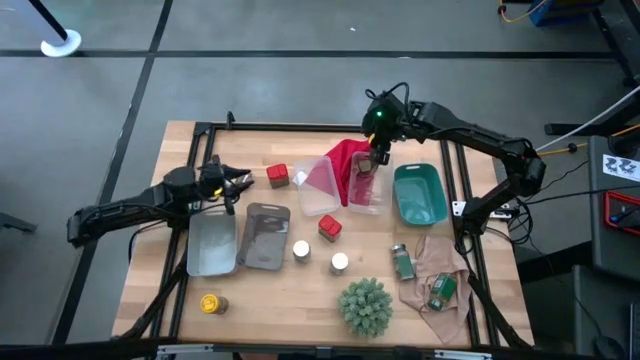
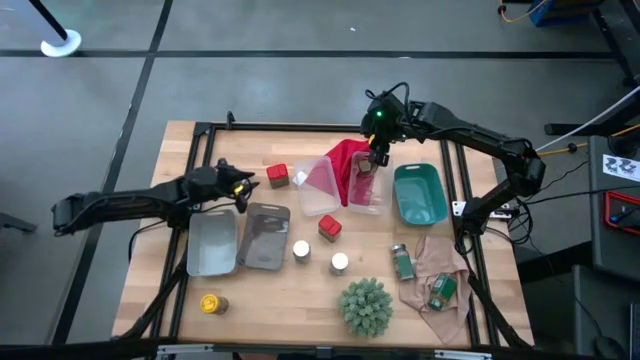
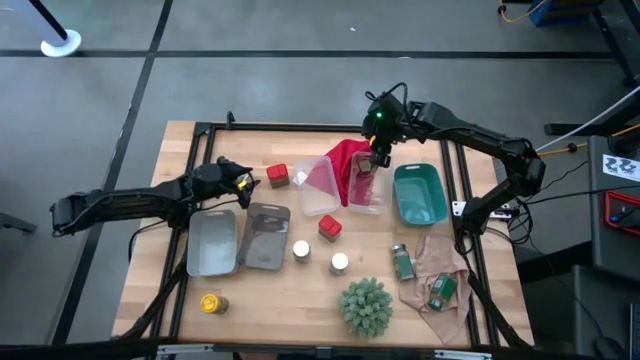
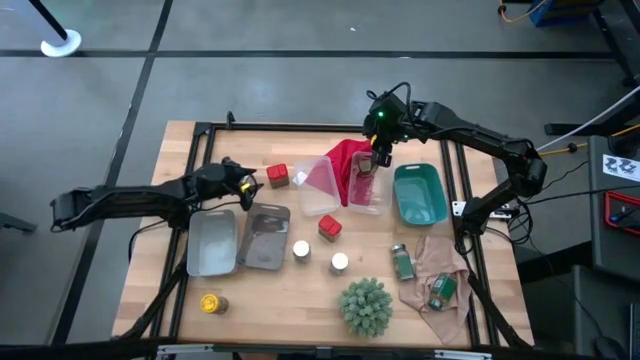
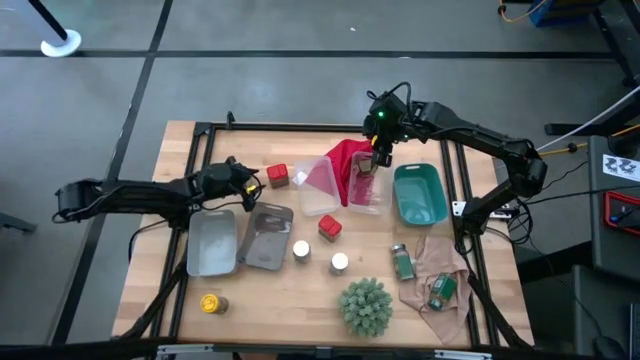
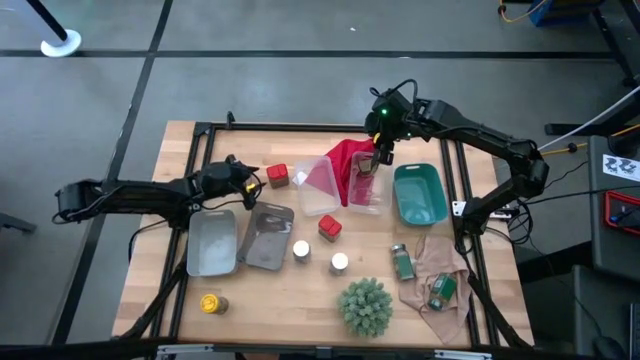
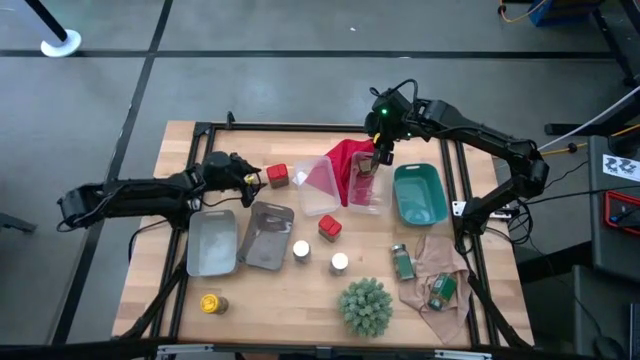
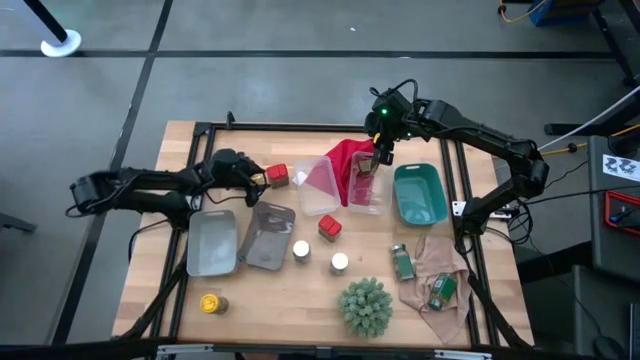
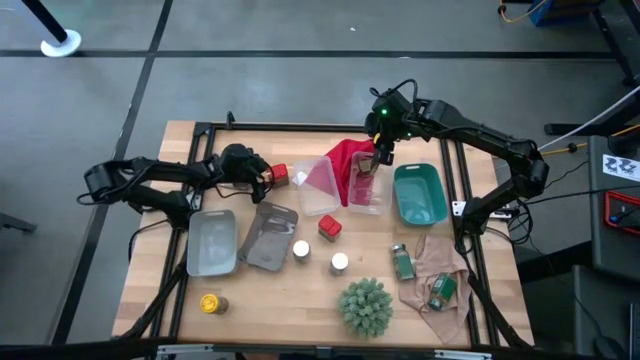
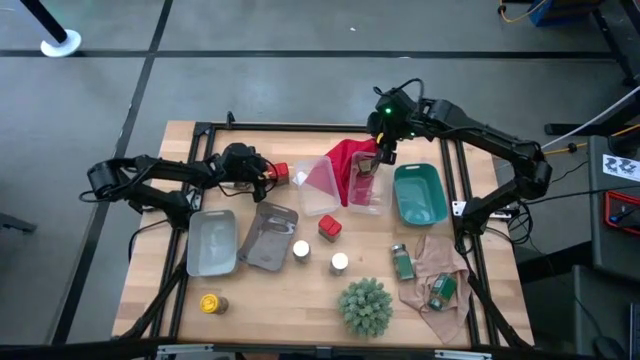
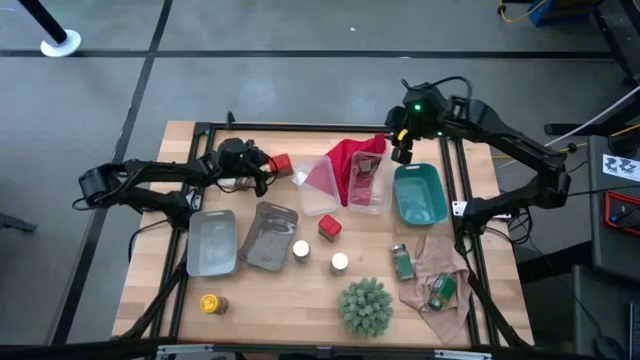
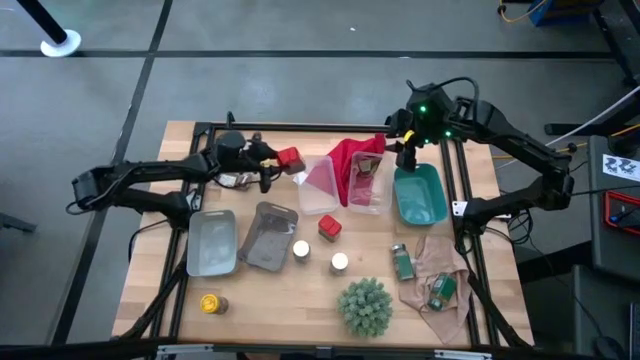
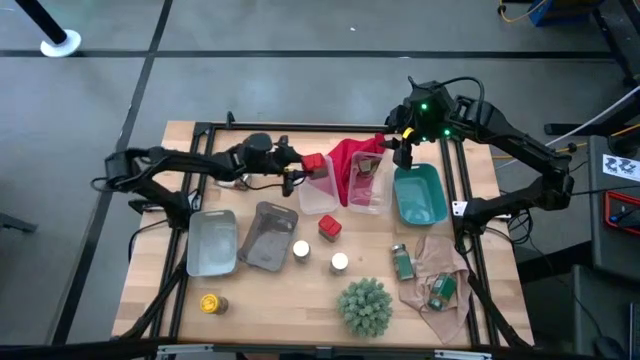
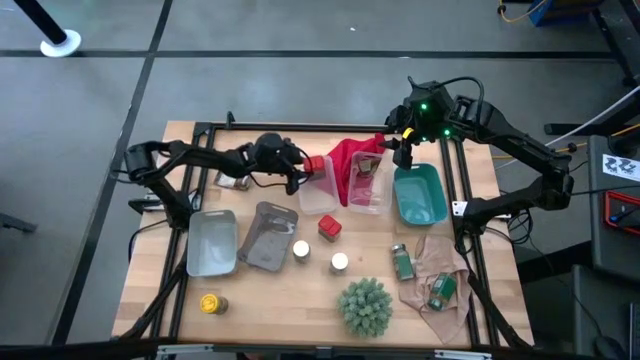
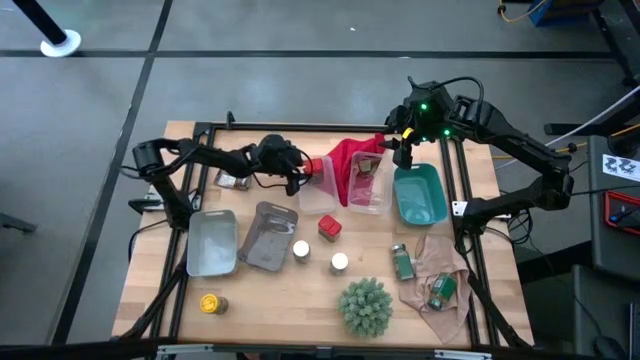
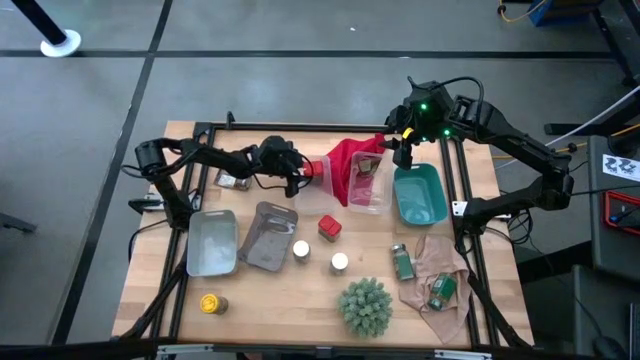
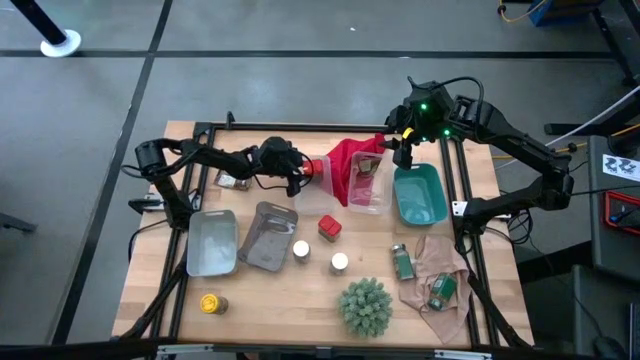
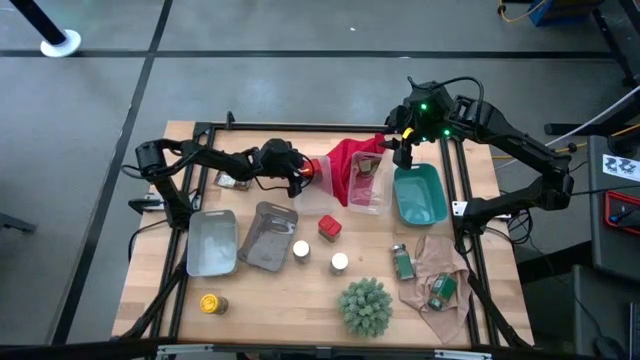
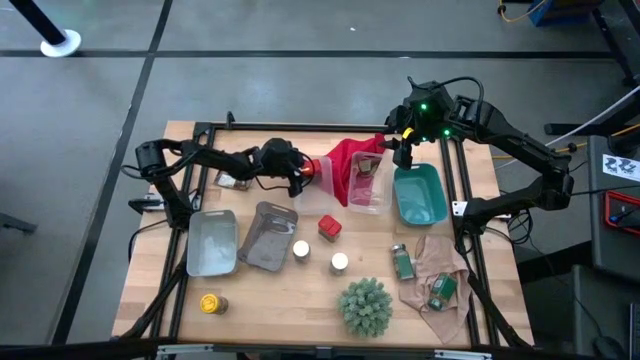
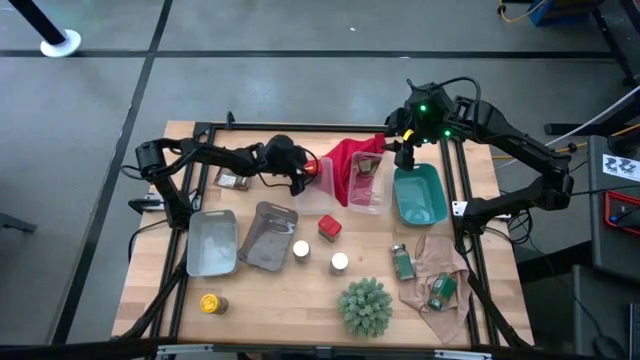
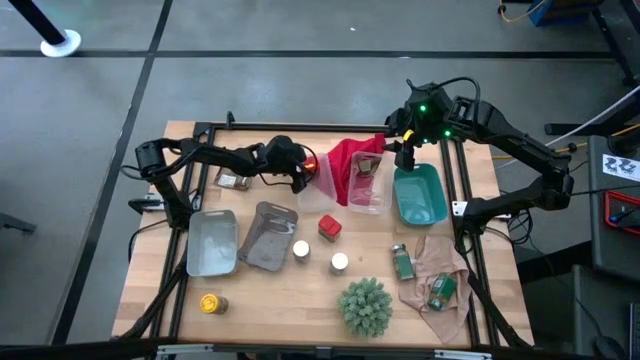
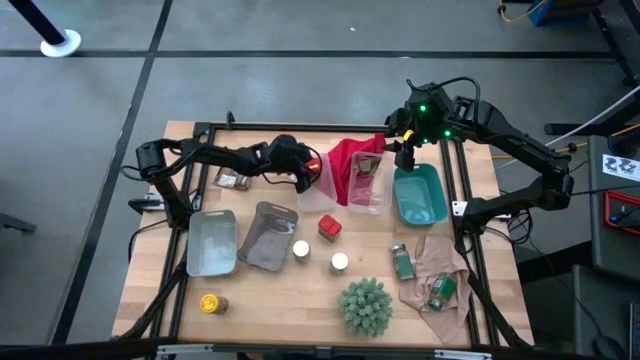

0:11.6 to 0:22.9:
Task: Sort spices by type
Put the top red seasoning can into the left transparent bin

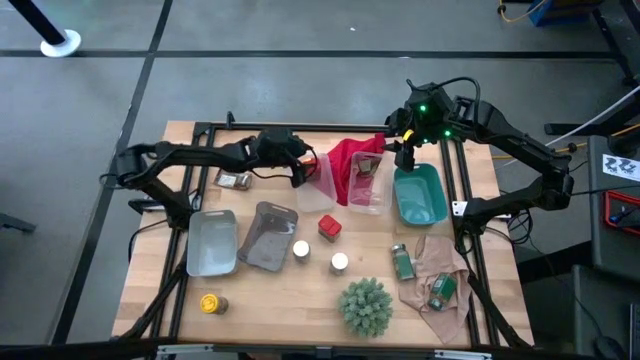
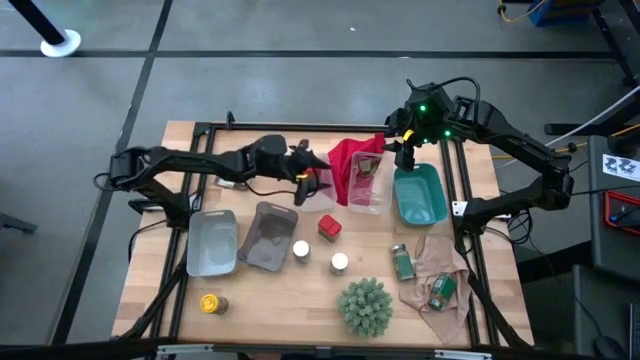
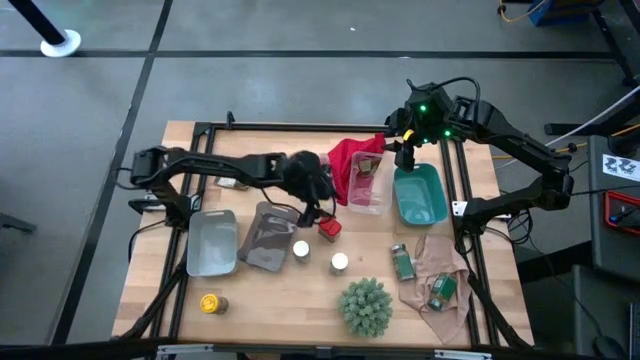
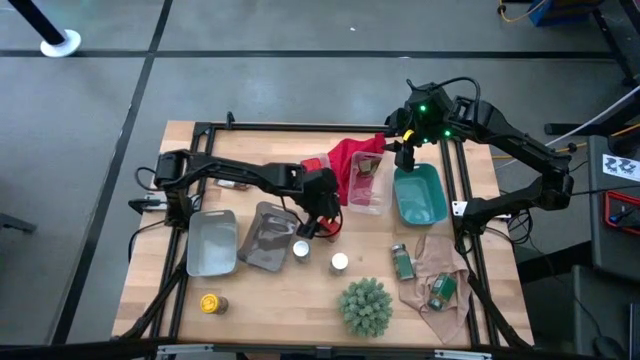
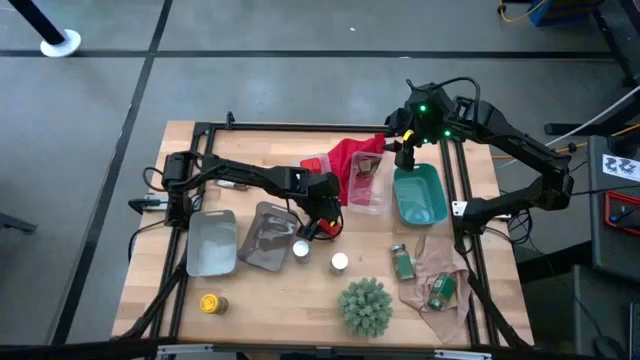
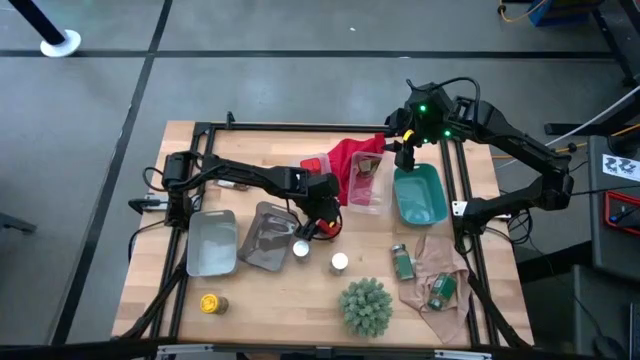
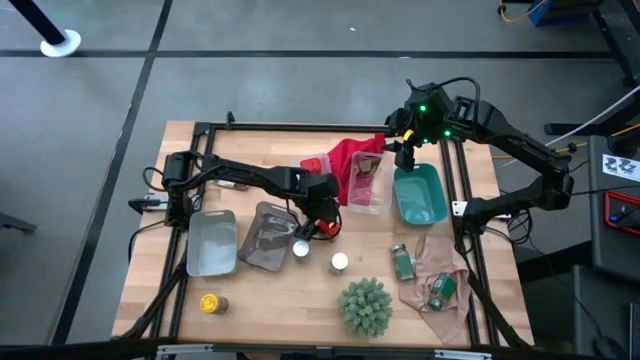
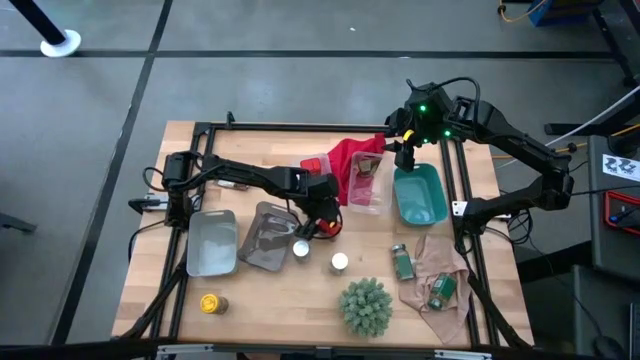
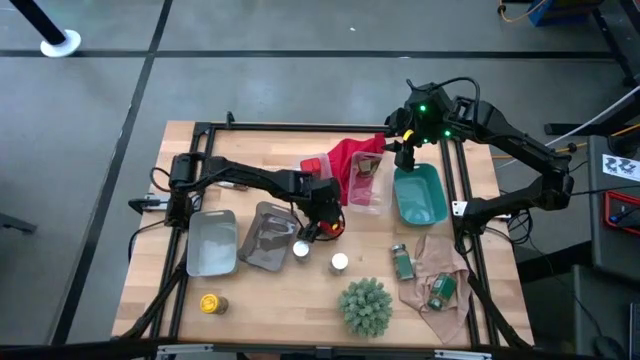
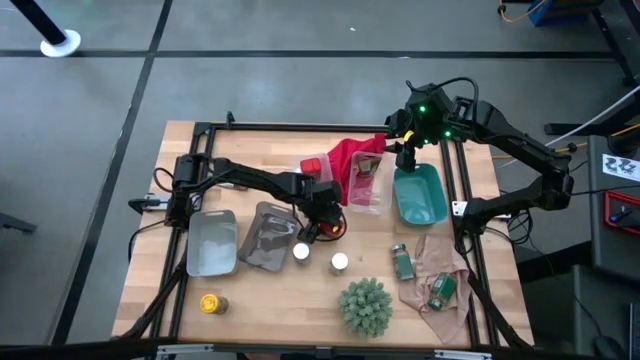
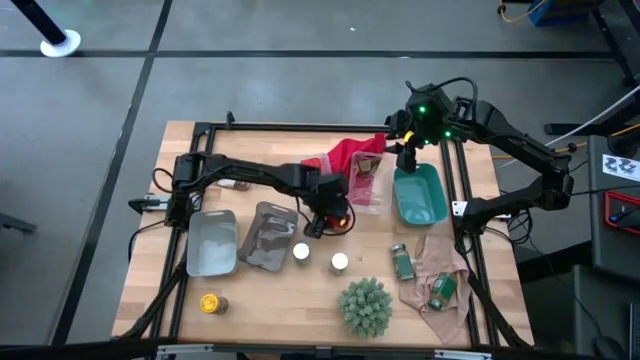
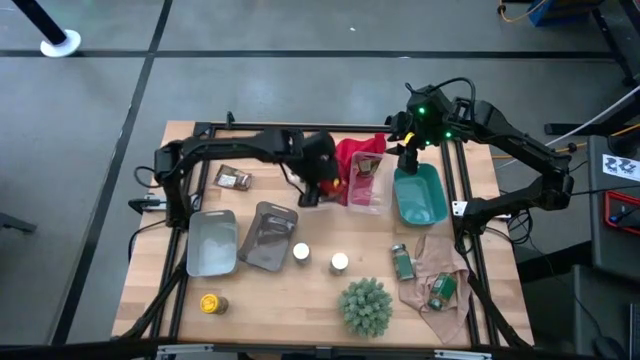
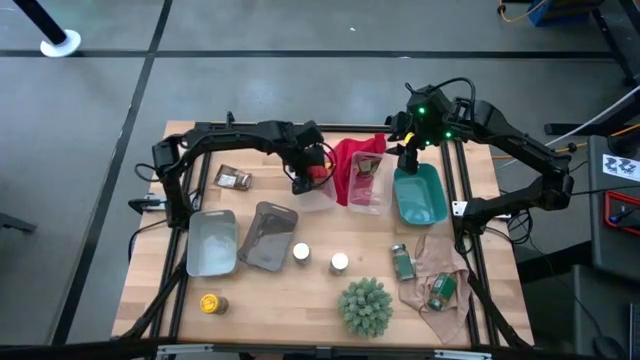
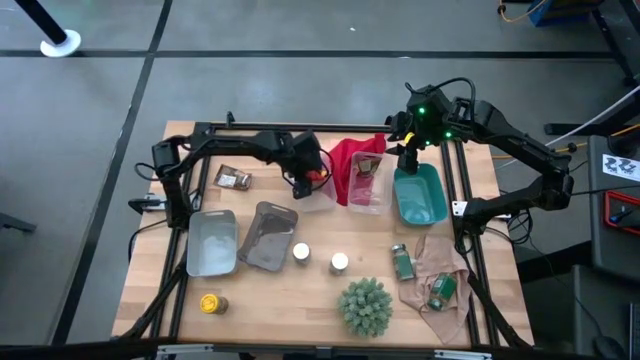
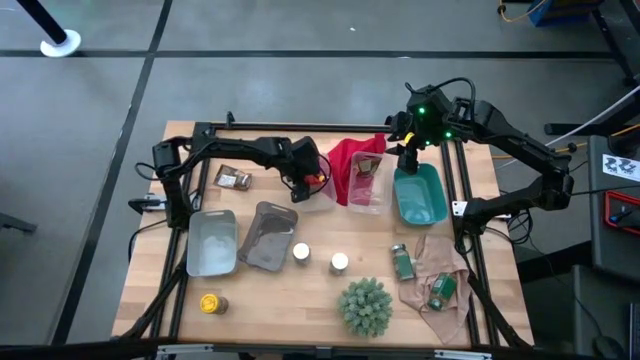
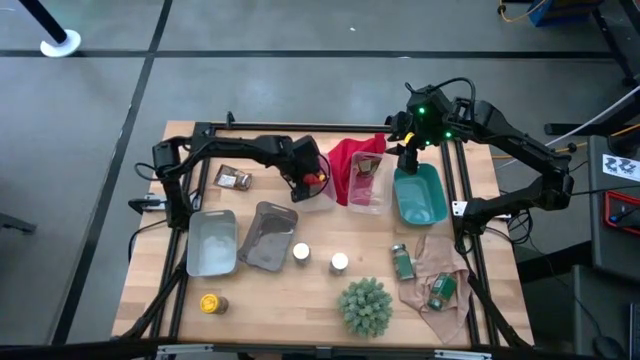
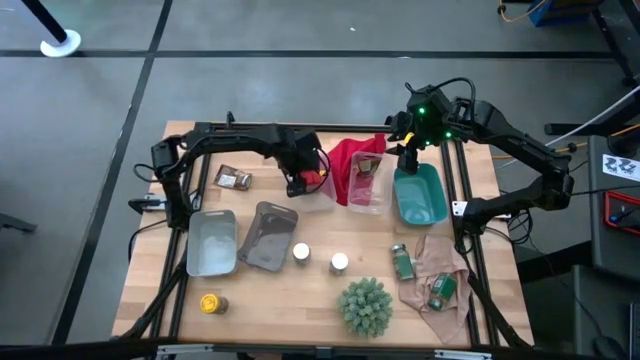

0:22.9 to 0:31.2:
Put the red seasoning can into the left transparent bin

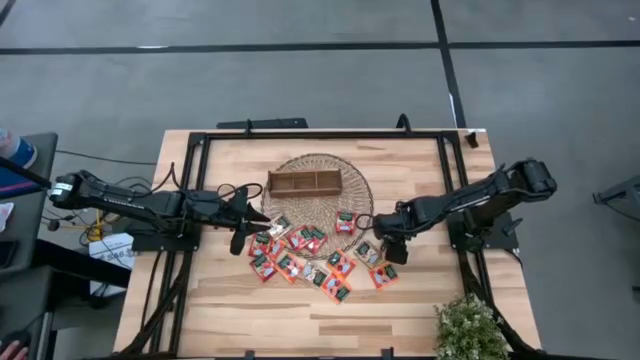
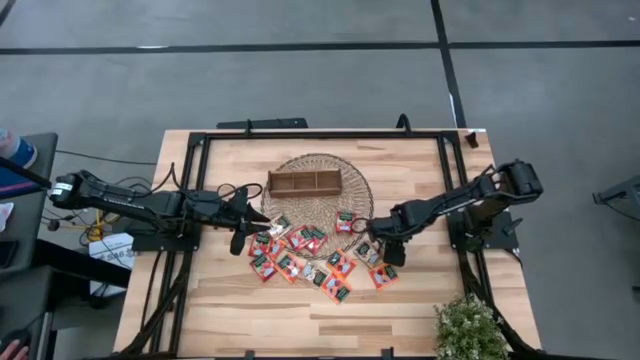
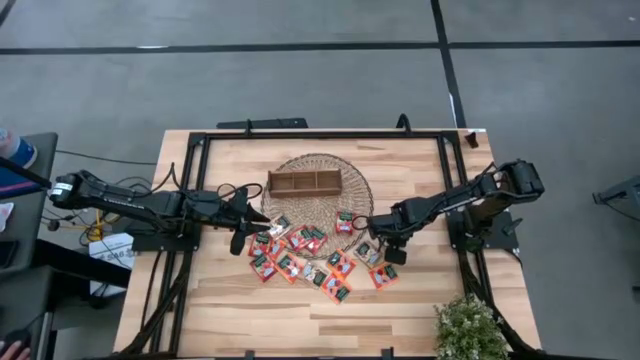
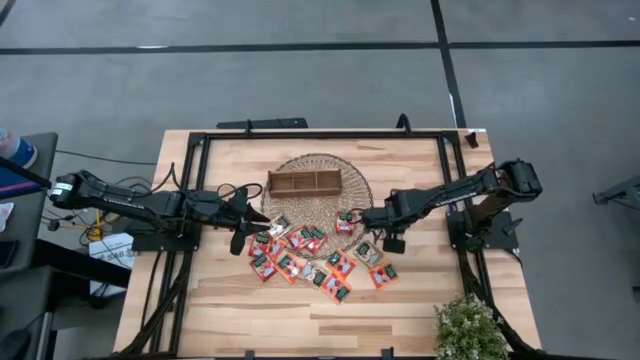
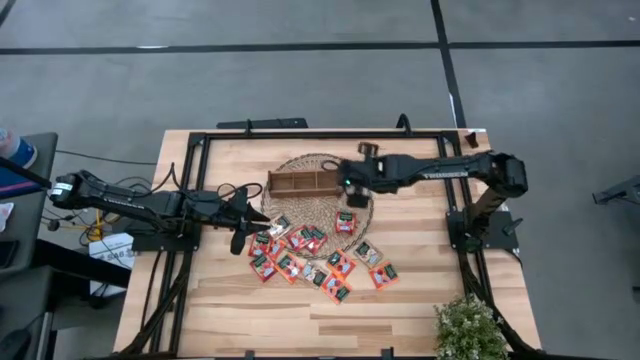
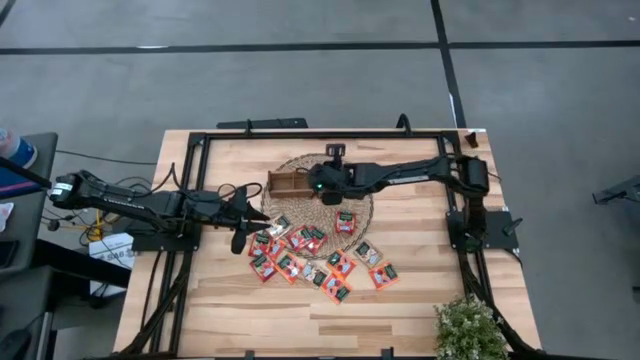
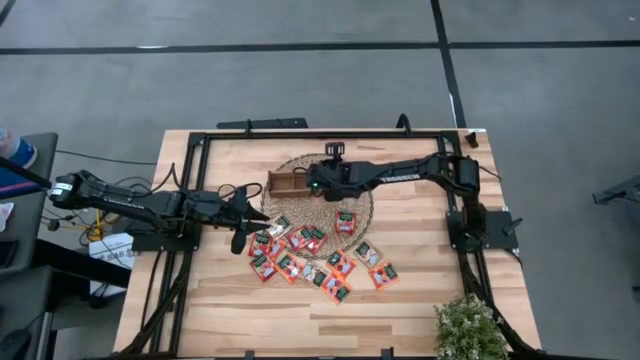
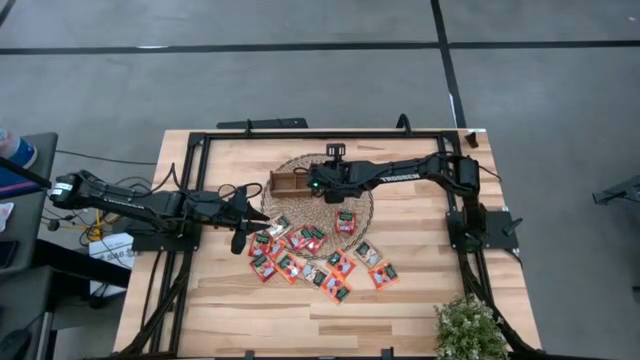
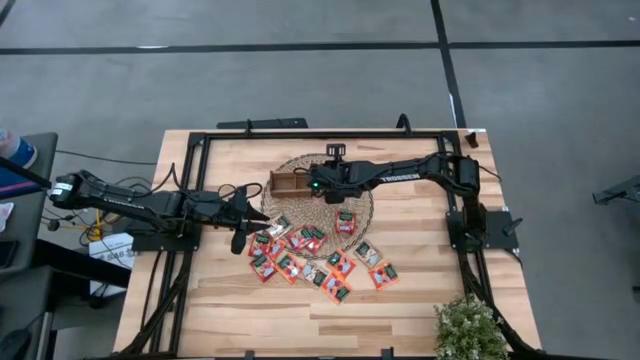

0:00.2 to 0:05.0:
Task: Pick & Place Tea
Put the brown tea bag into the right section of the wooden organizer
